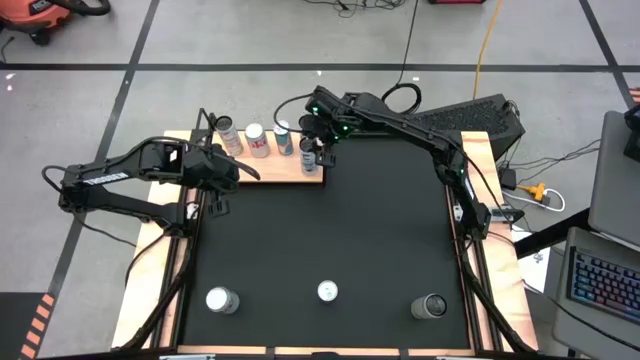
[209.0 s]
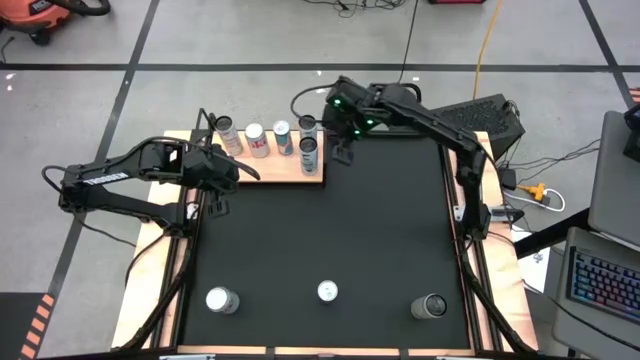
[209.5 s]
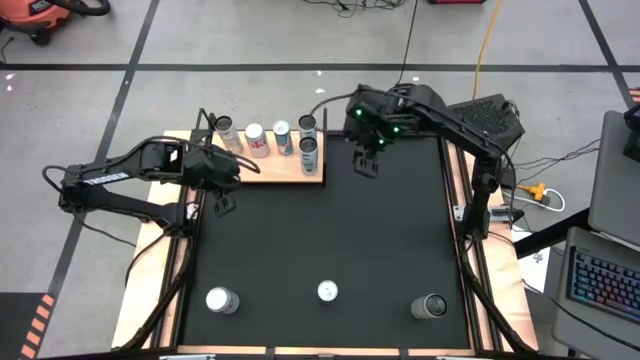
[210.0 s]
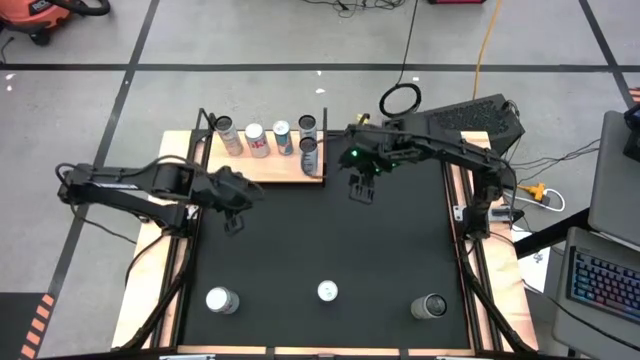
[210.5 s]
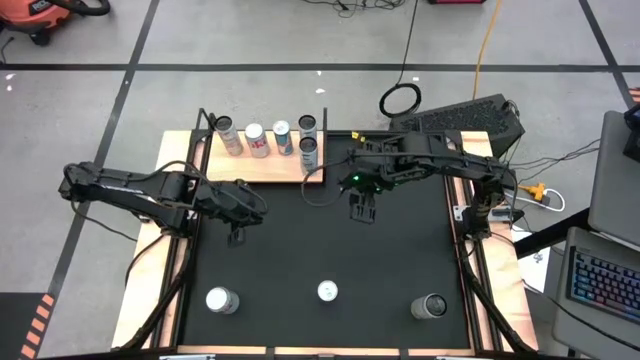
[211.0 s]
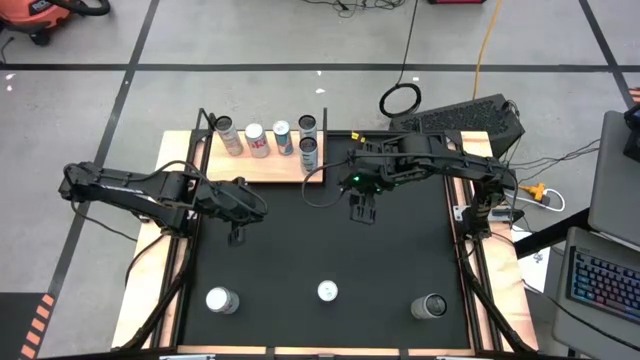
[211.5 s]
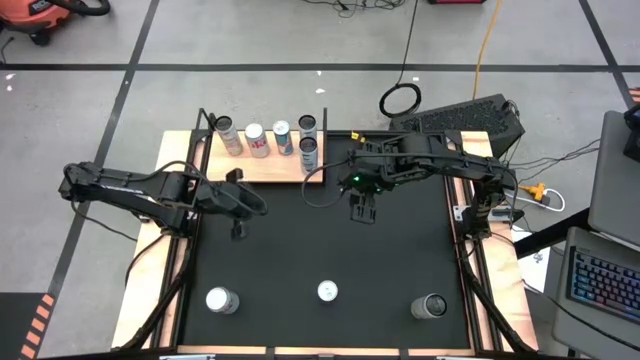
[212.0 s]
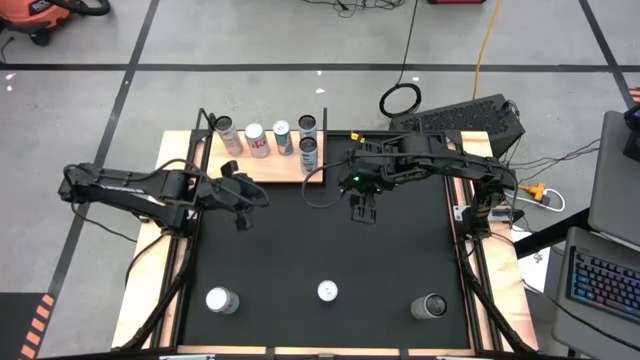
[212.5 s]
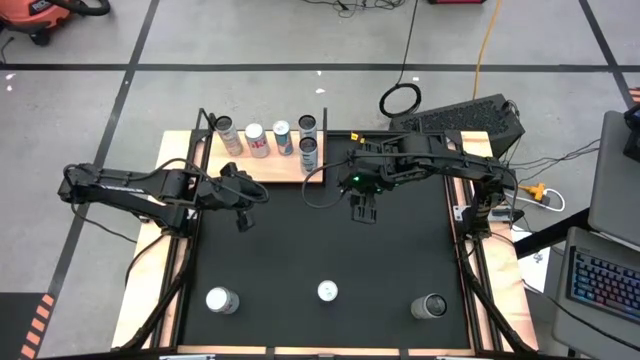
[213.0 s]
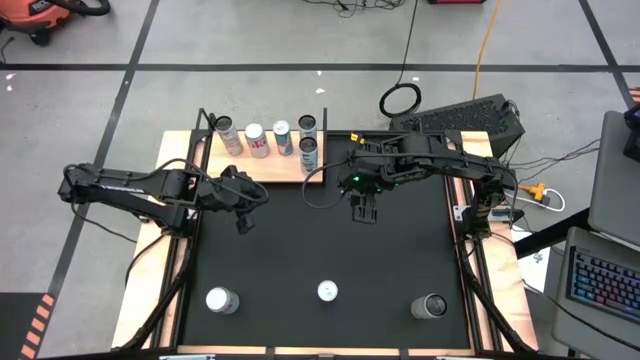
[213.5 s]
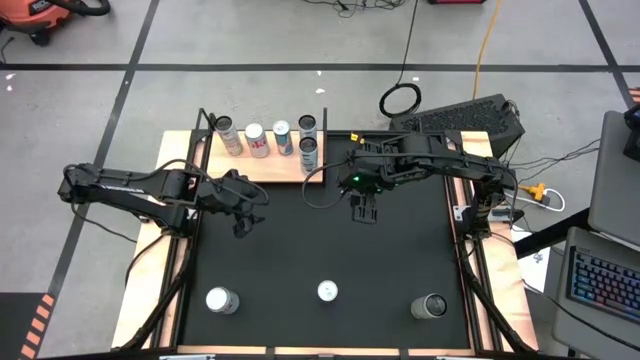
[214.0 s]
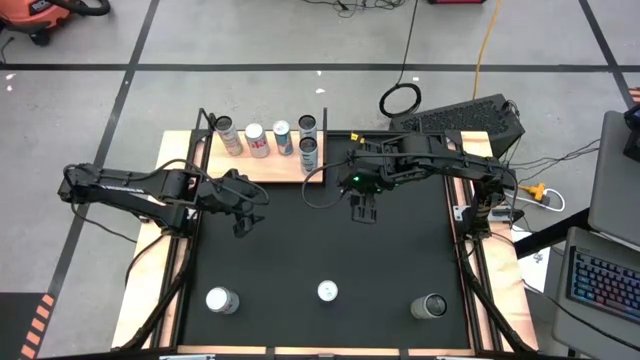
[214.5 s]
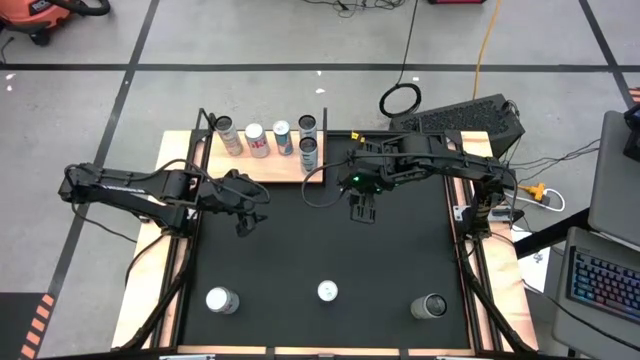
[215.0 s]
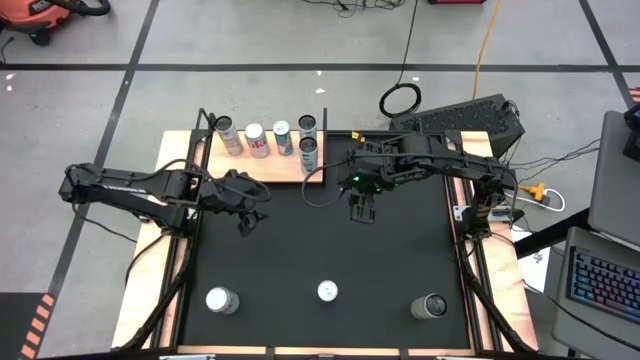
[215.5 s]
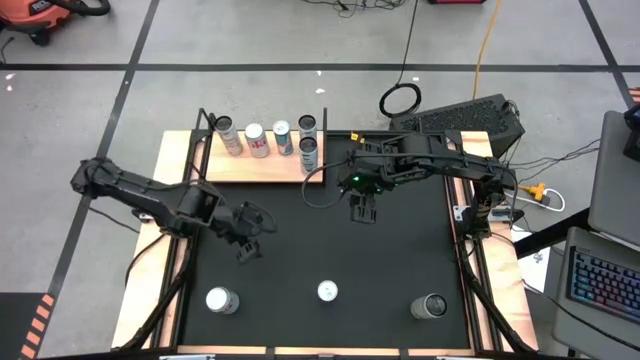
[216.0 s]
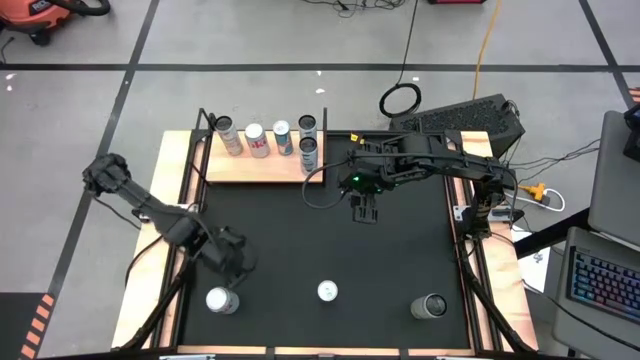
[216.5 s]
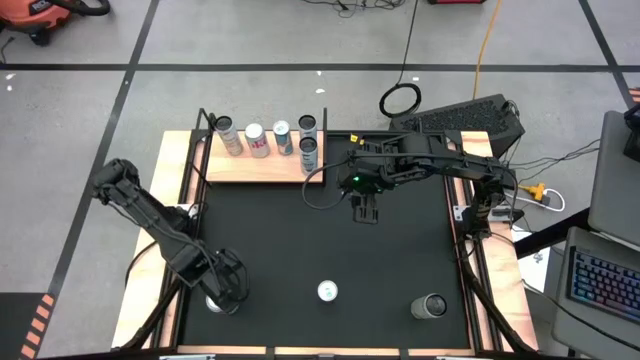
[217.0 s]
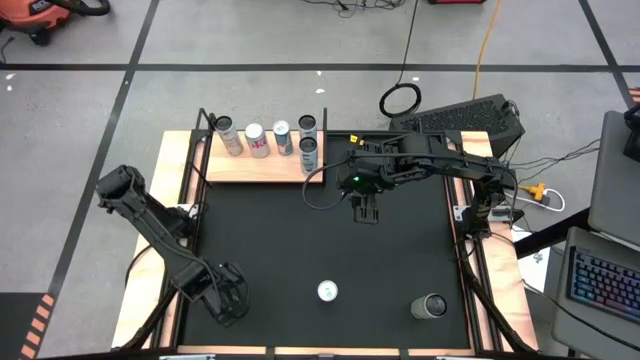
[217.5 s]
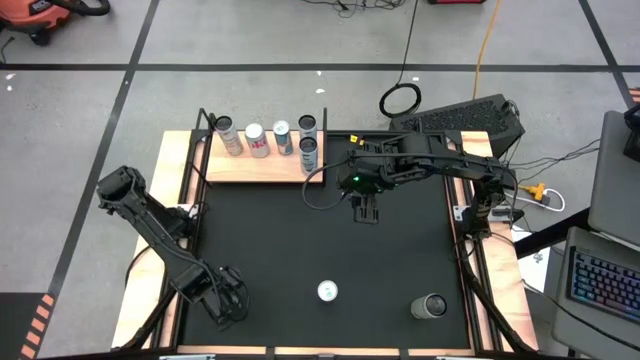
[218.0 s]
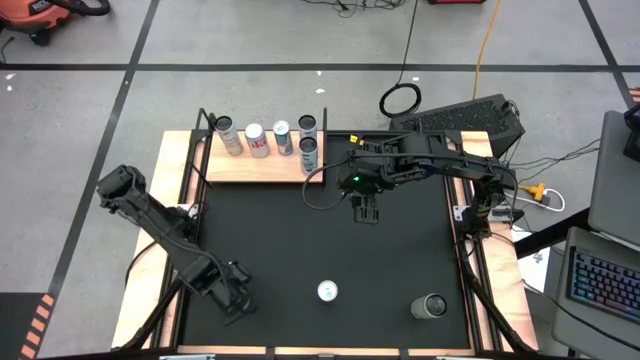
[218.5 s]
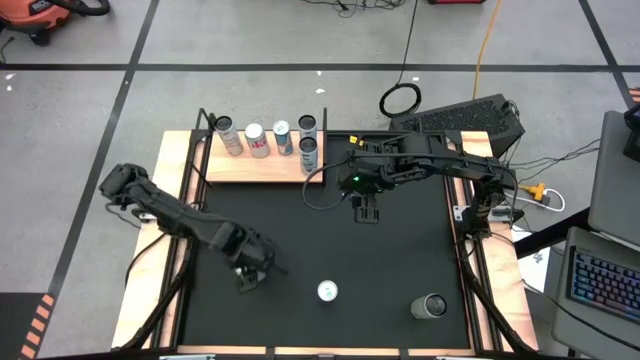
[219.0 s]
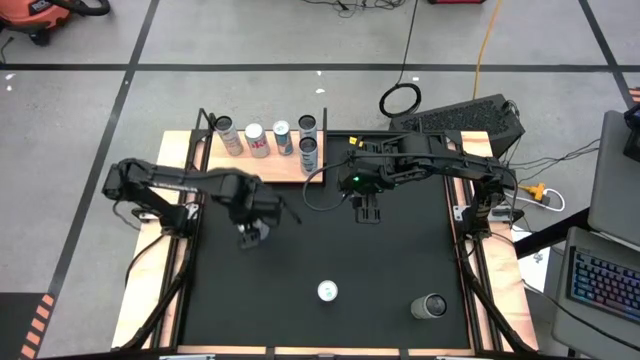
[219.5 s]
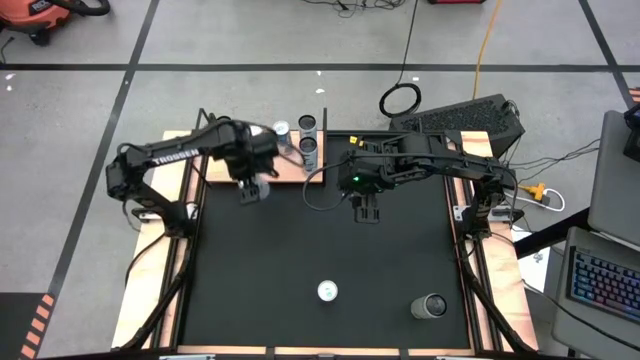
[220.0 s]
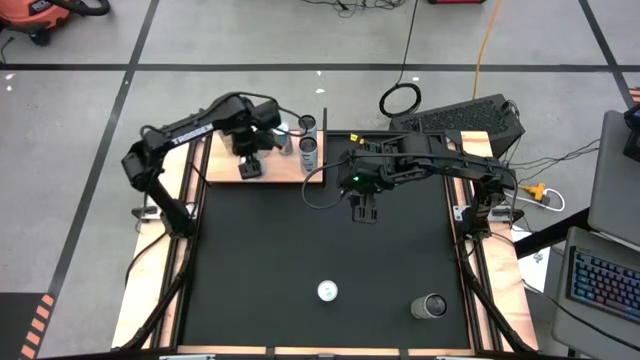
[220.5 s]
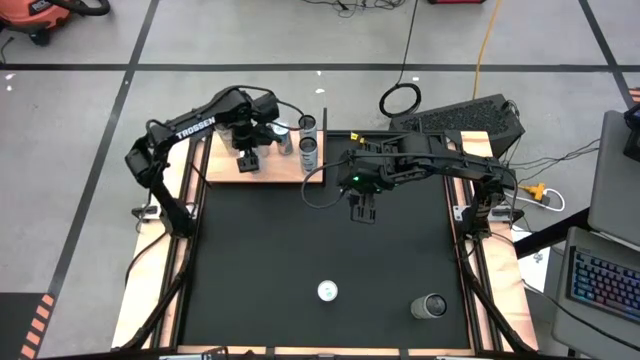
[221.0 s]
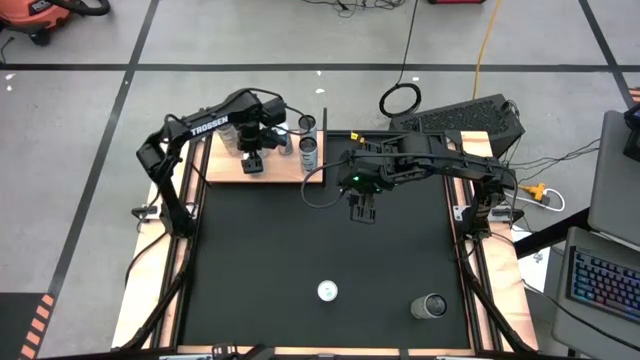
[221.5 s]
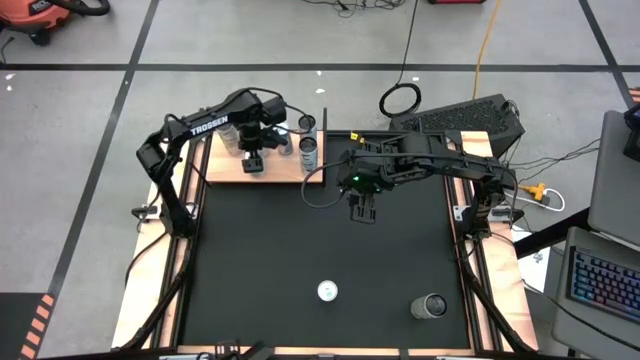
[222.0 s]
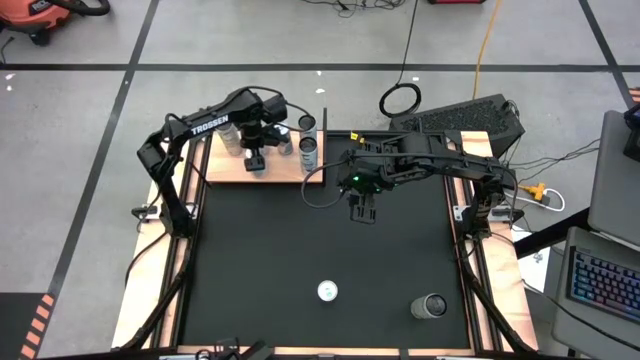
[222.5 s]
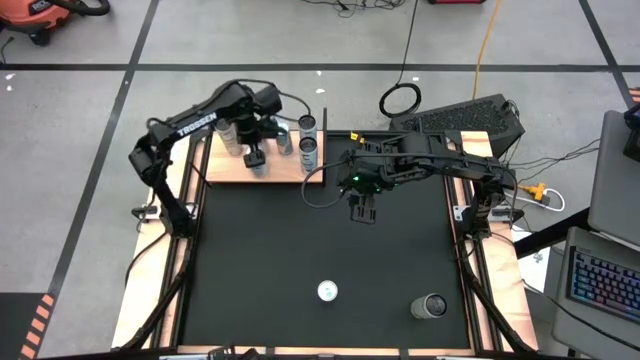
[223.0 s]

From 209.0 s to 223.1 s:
Task: Place canned beverage on shelf
Align the red and silver soda can with the other red and silver soda can on the shelf

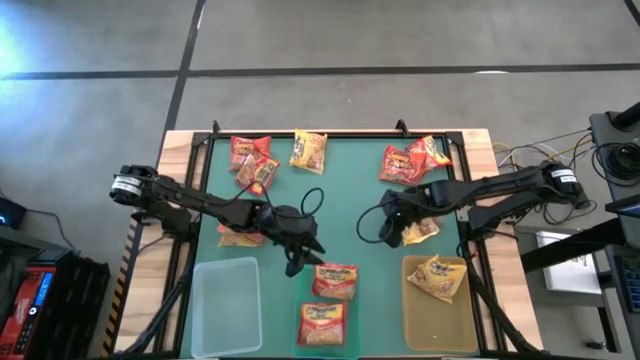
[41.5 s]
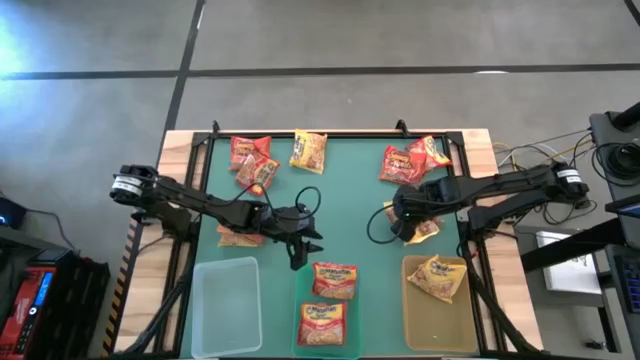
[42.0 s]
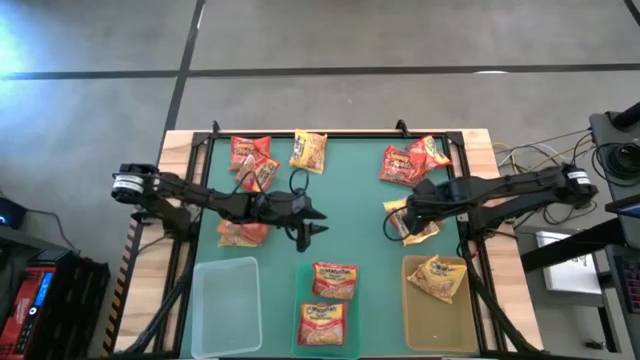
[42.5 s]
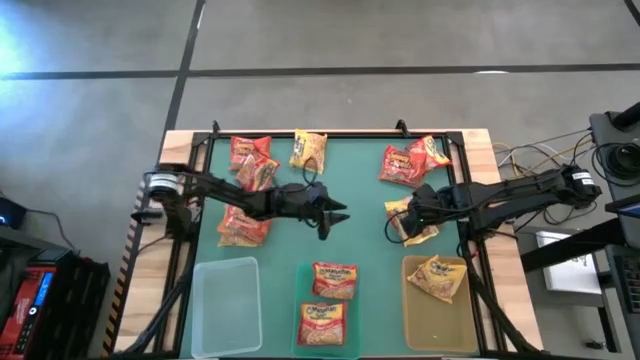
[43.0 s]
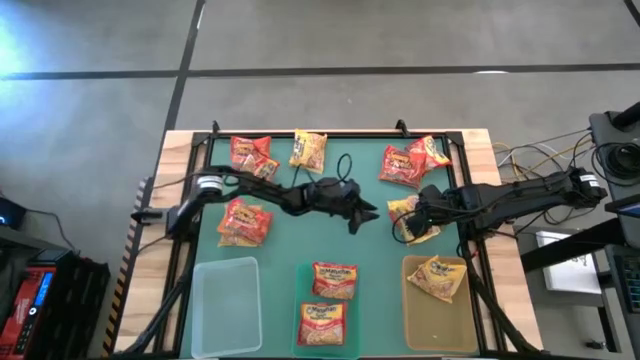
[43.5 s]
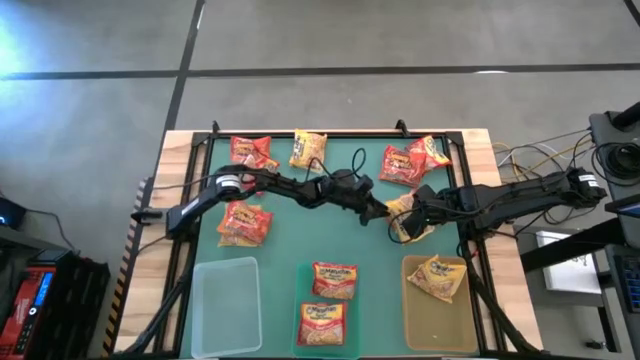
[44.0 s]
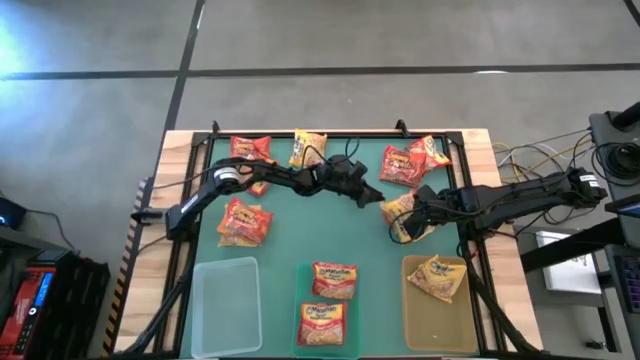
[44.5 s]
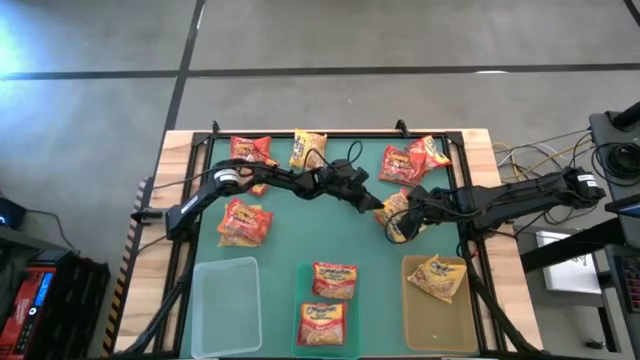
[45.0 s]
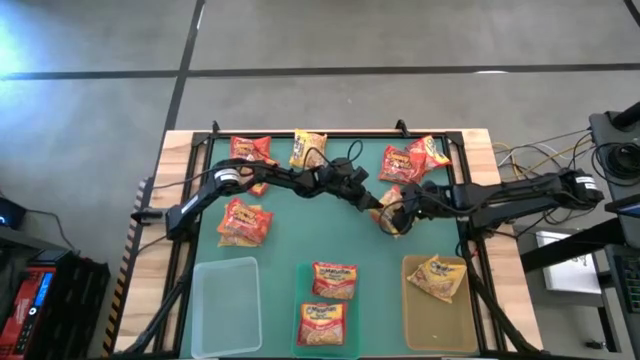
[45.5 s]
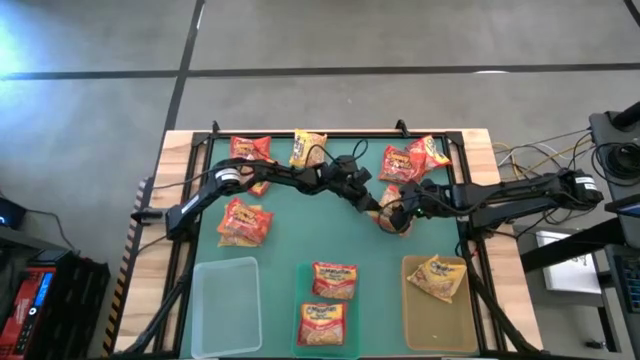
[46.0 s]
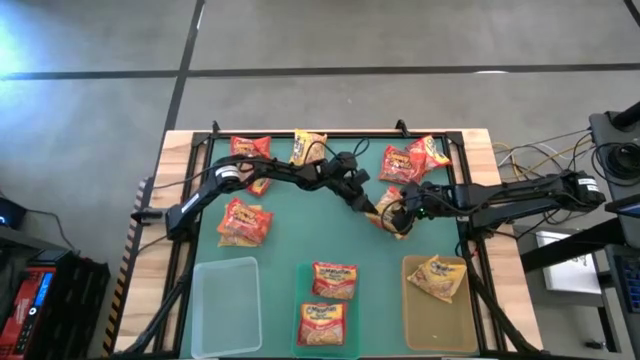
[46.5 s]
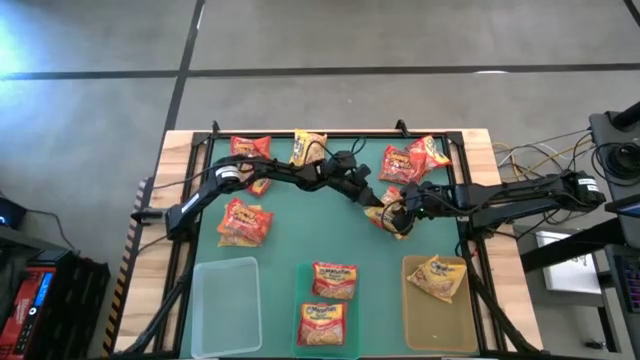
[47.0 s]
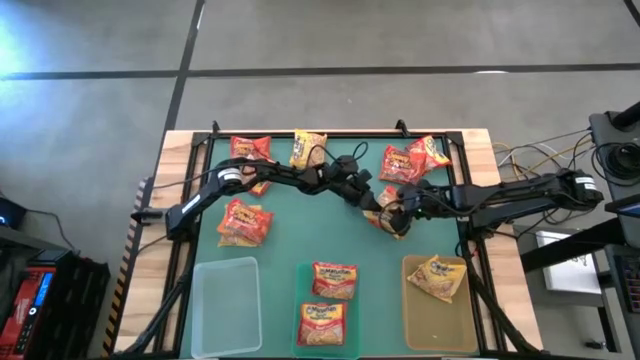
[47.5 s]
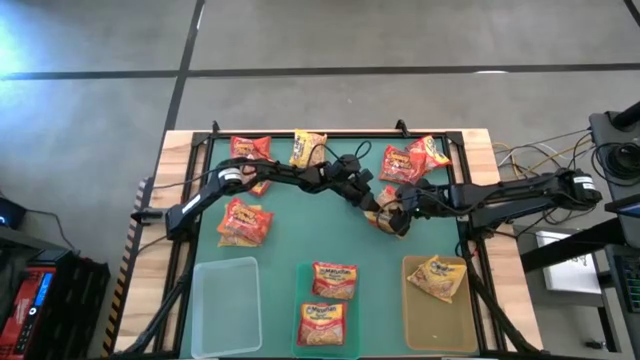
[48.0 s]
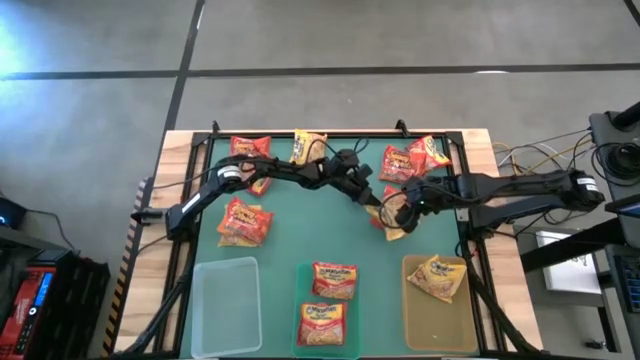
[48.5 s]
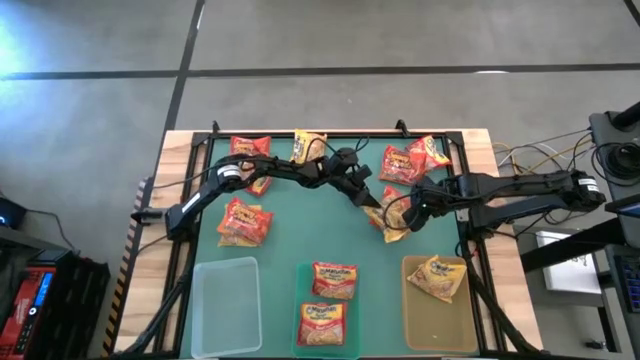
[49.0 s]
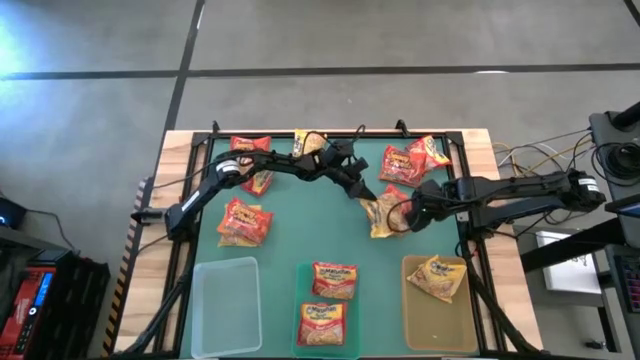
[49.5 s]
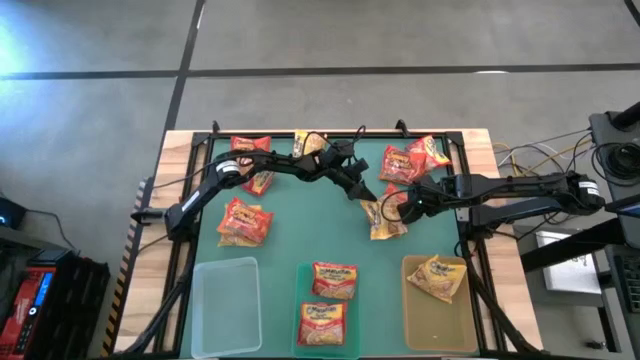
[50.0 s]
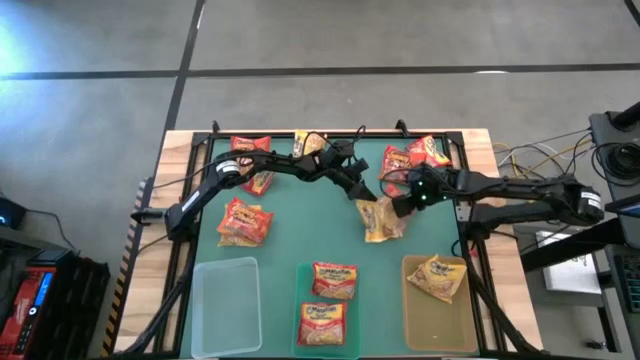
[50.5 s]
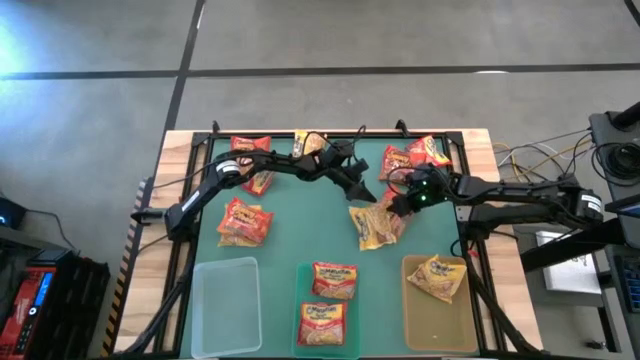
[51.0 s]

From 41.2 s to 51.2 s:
Task: Sort Maruchan noodles
Put the yellow noodle pack into the orange bin
